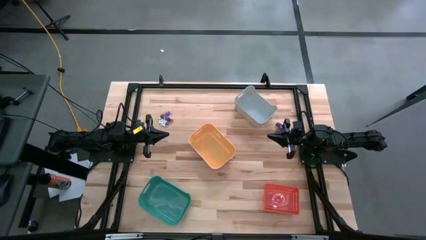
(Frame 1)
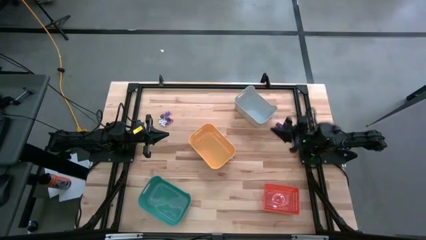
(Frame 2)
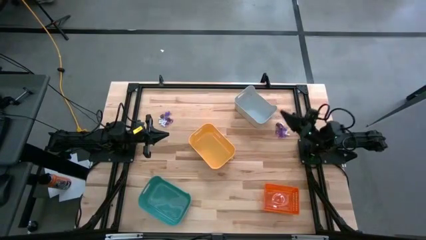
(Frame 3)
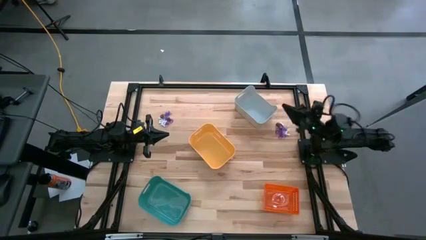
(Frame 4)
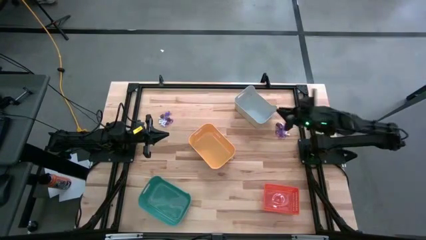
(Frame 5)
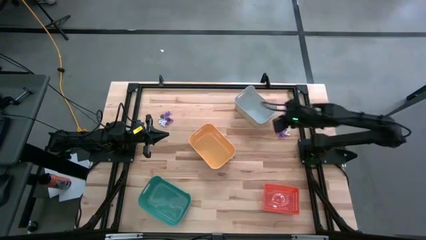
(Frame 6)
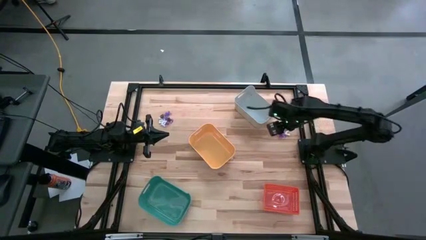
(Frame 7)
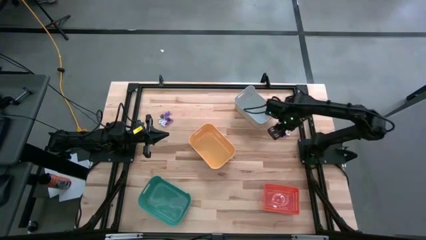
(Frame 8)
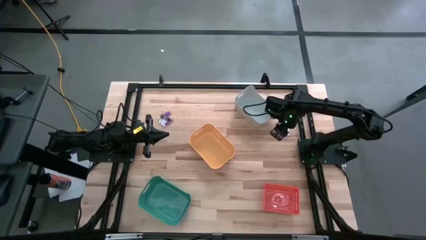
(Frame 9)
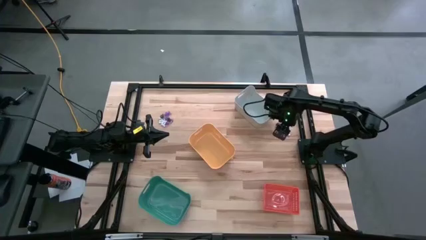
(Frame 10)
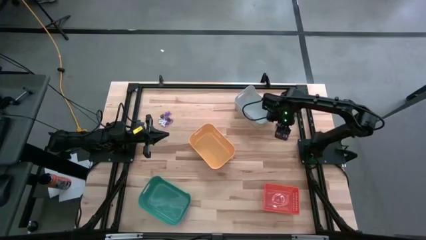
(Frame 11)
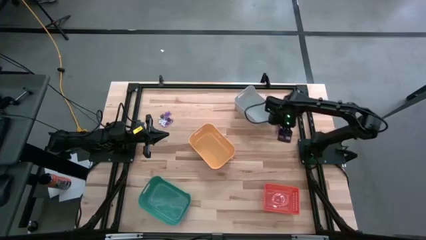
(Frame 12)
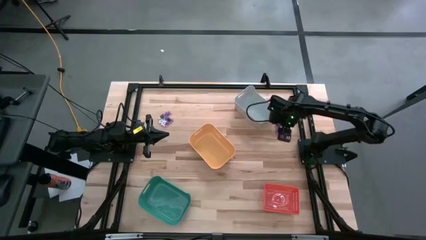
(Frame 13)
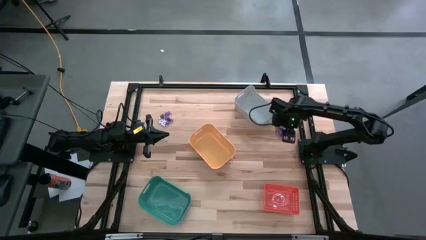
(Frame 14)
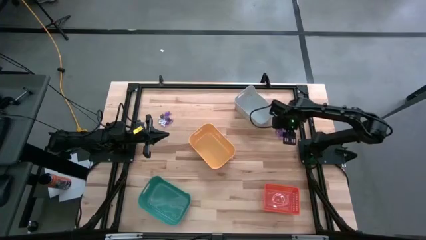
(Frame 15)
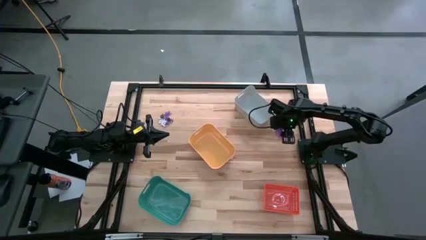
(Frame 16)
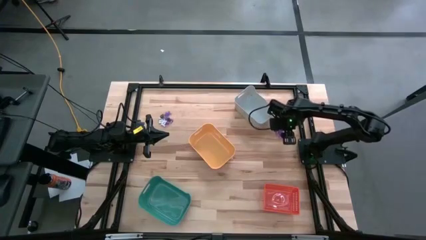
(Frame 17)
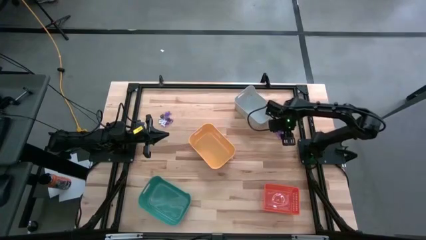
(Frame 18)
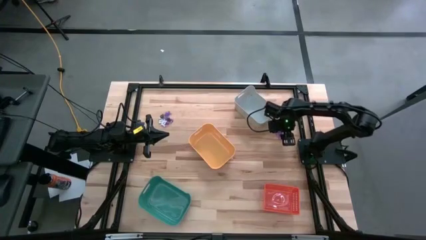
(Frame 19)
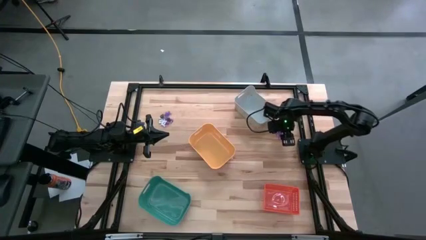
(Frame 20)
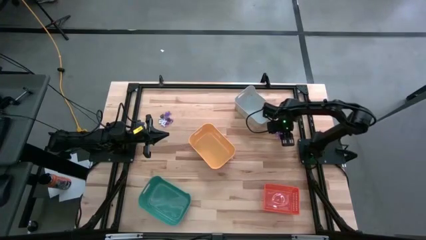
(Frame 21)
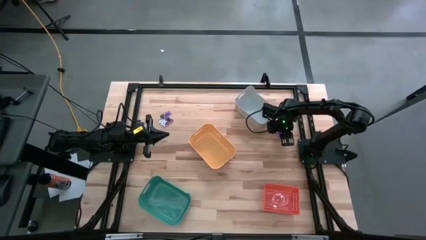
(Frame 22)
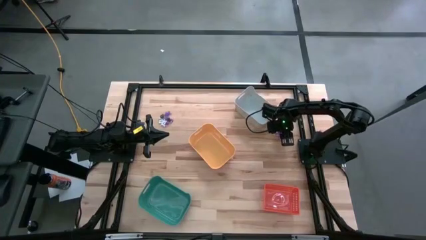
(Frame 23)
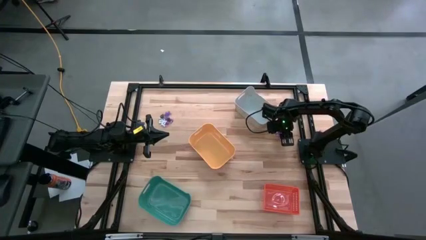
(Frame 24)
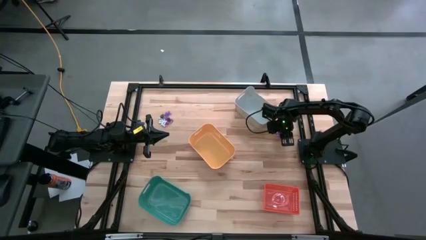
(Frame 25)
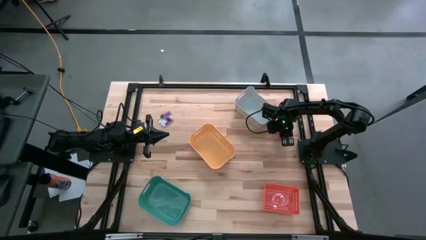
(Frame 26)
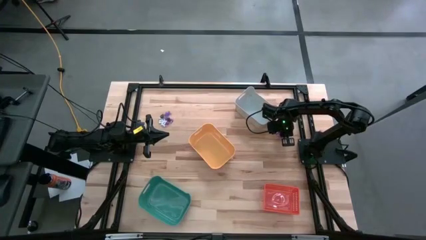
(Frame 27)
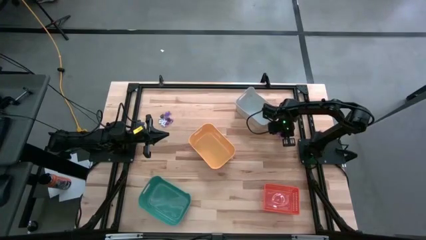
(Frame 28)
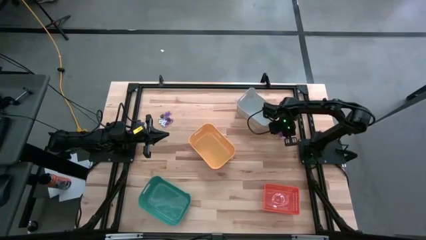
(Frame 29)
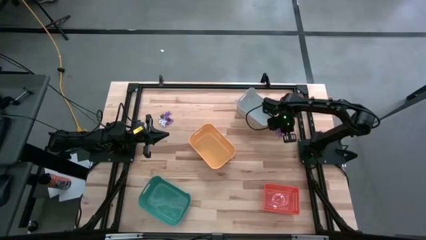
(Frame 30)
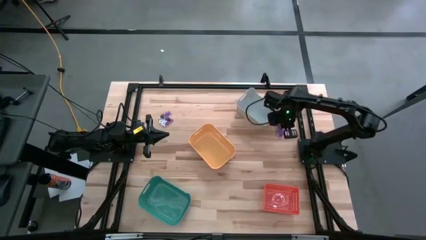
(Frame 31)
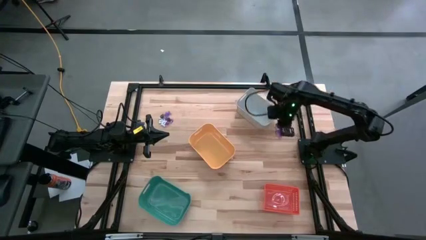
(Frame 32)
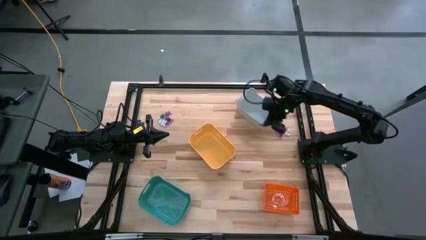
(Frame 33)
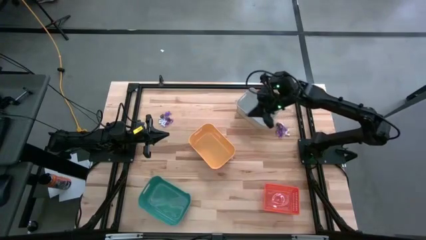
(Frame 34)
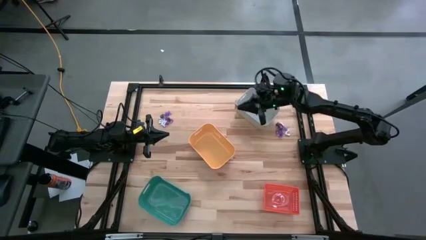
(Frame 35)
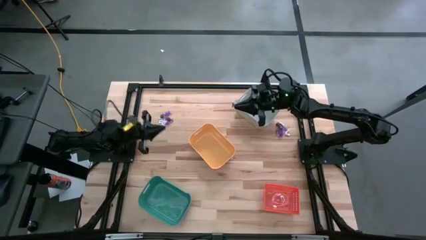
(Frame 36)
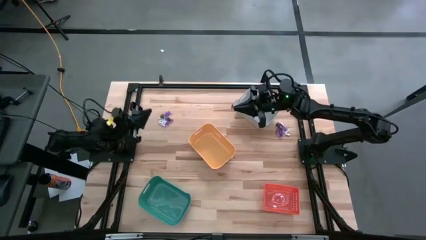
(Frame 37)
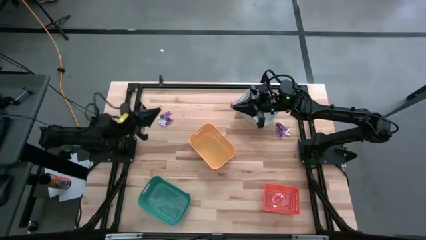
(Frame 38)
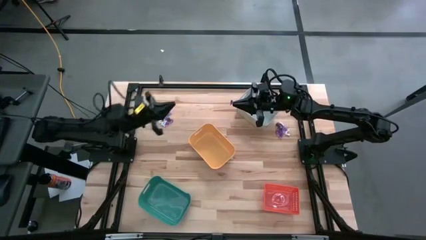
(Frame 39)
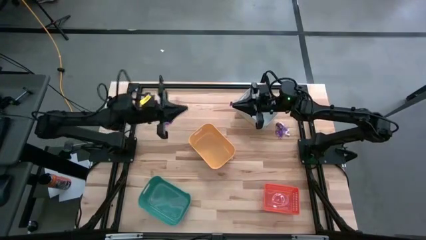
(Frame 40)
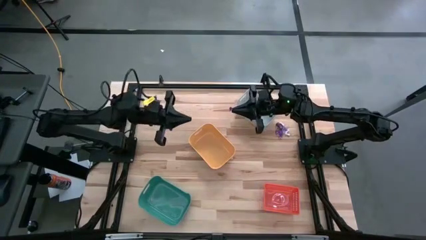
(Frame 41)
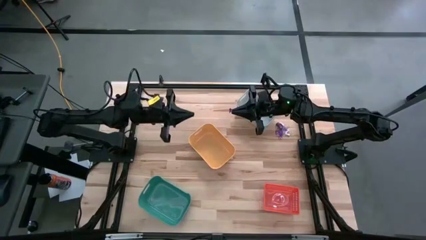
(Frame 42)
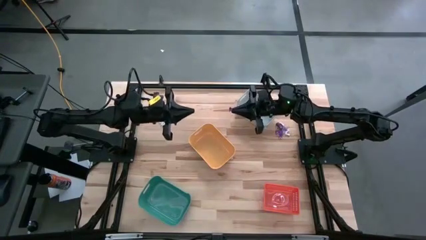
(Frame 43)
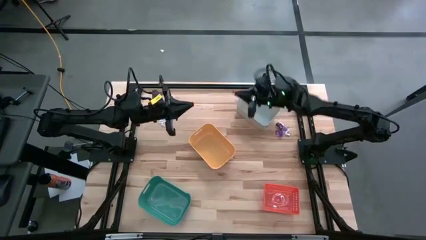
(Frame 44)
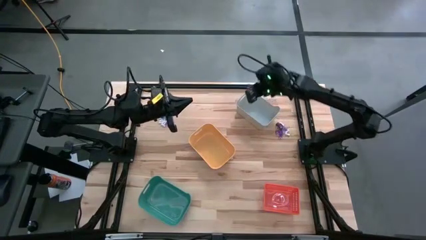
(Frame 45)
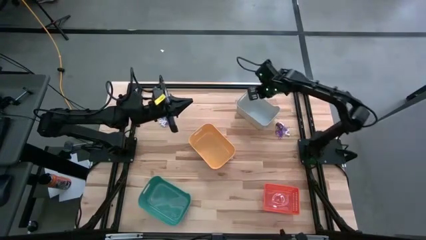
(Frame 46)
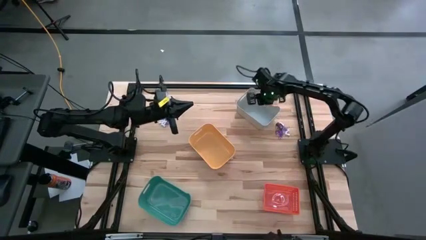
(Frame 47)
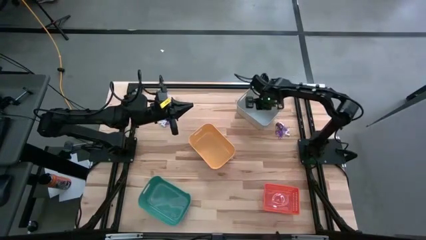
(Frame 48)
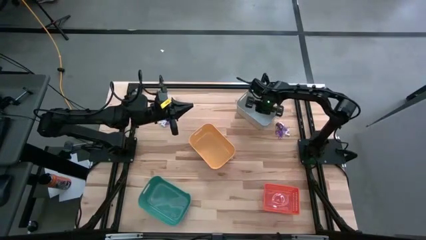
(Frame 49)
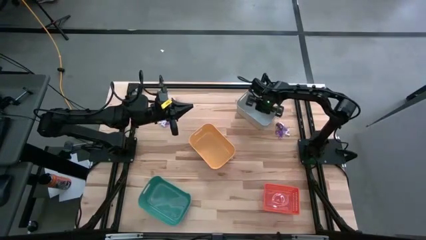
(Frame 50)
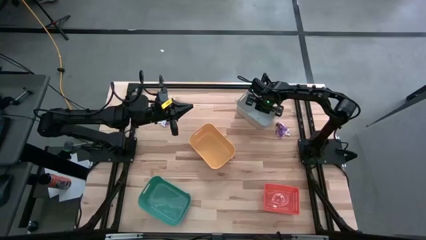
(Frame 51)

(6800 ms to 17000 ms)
Task: Sort Halloween decoration
Put the purple witch hat toy into the white bin

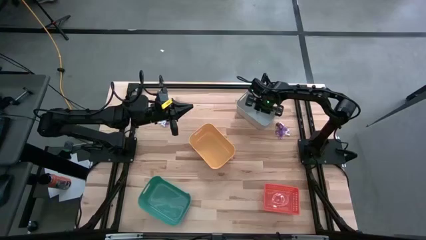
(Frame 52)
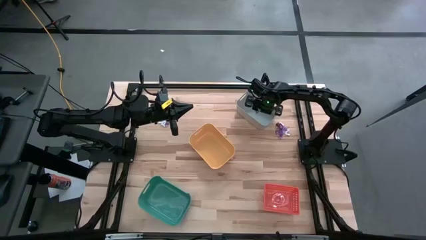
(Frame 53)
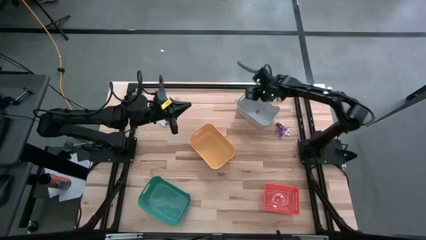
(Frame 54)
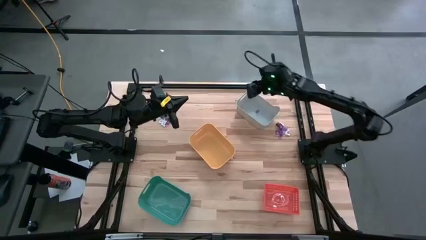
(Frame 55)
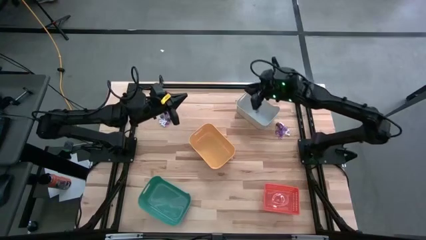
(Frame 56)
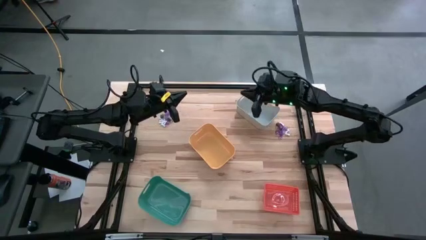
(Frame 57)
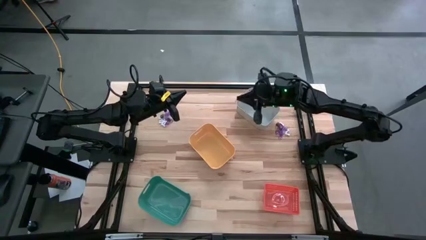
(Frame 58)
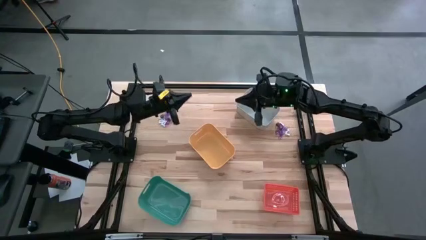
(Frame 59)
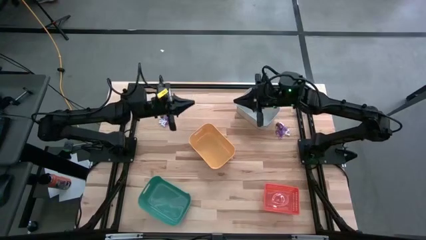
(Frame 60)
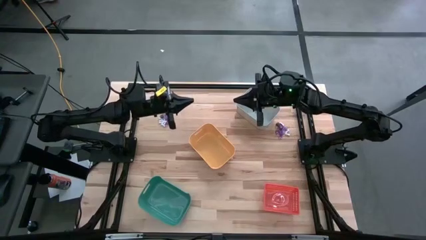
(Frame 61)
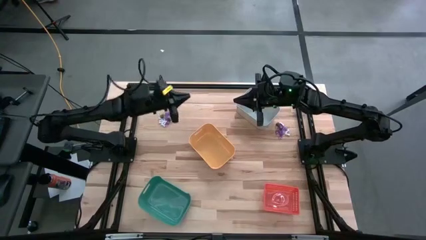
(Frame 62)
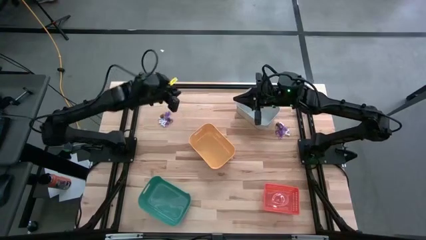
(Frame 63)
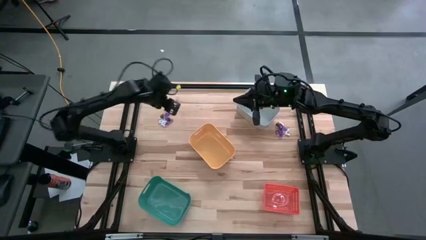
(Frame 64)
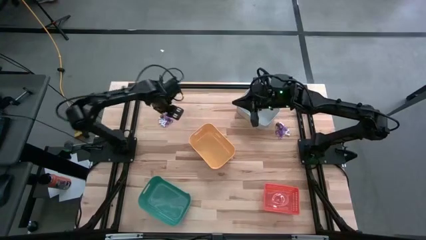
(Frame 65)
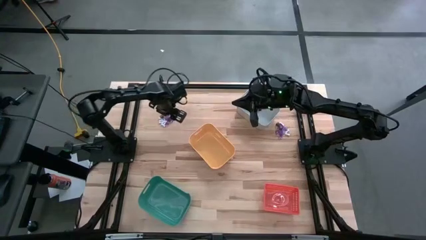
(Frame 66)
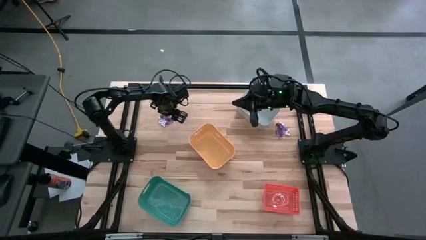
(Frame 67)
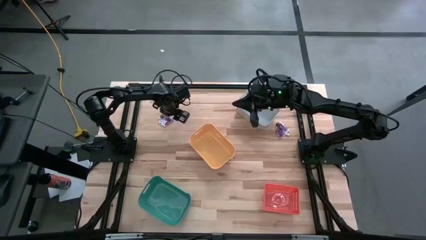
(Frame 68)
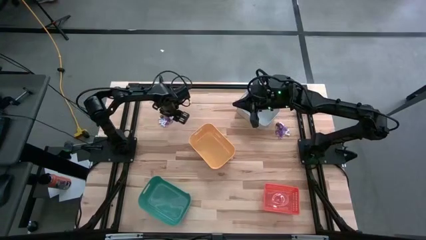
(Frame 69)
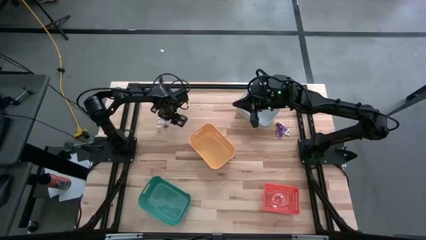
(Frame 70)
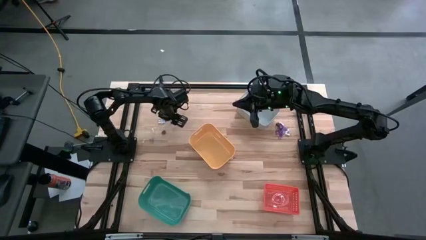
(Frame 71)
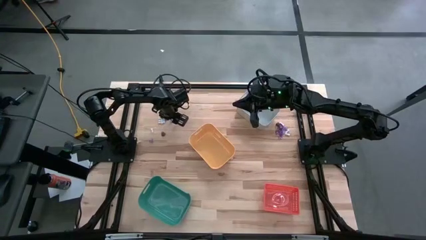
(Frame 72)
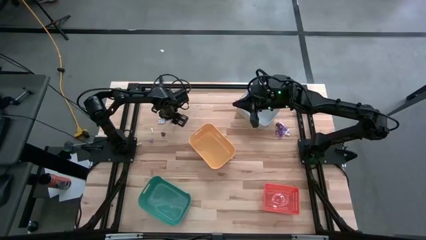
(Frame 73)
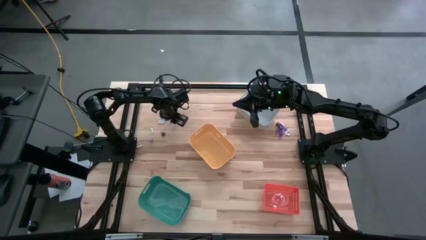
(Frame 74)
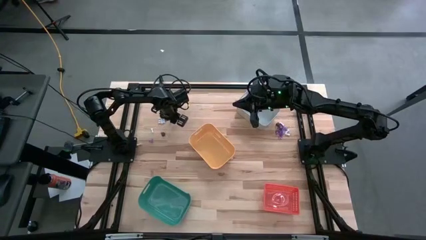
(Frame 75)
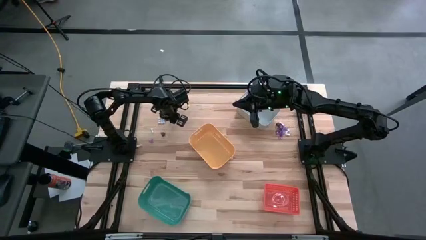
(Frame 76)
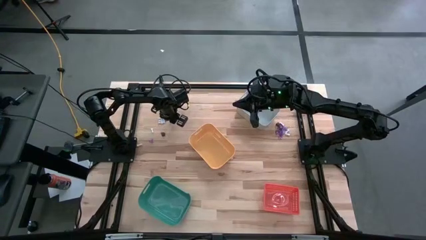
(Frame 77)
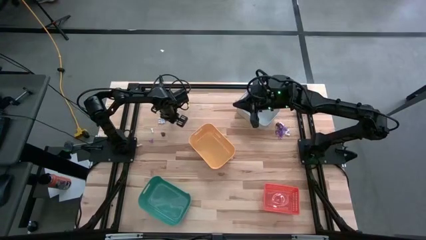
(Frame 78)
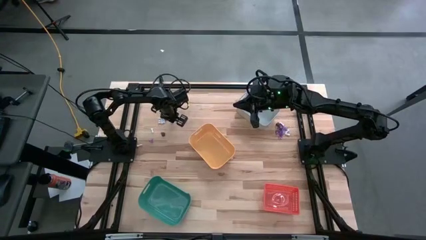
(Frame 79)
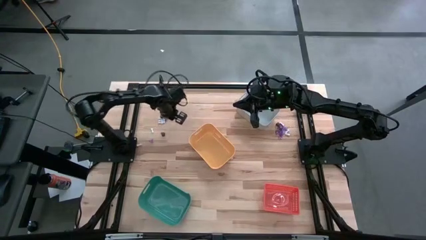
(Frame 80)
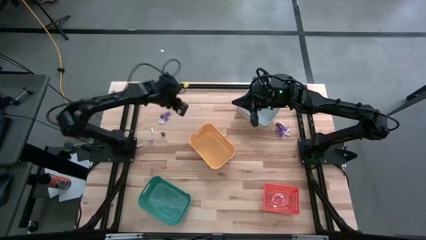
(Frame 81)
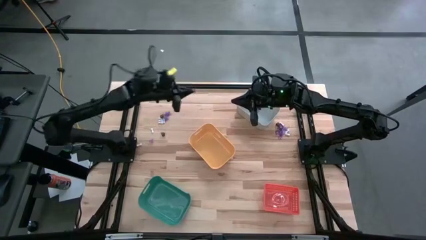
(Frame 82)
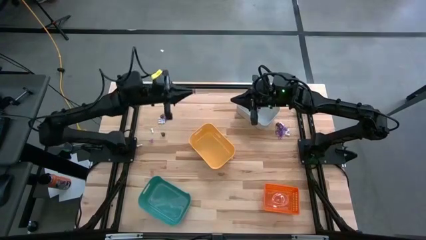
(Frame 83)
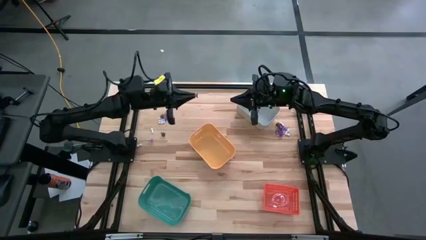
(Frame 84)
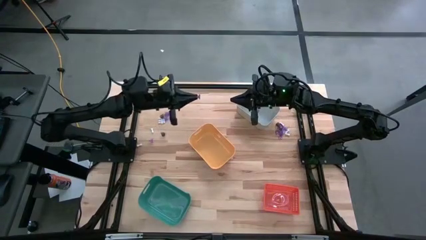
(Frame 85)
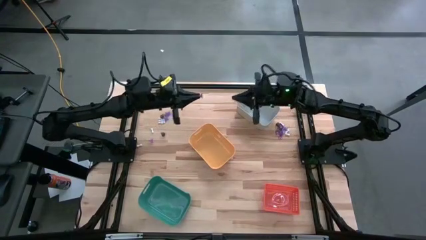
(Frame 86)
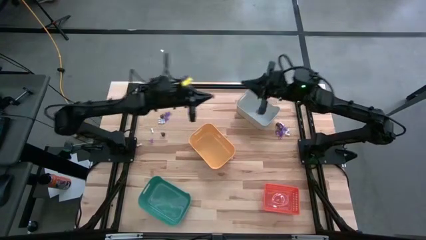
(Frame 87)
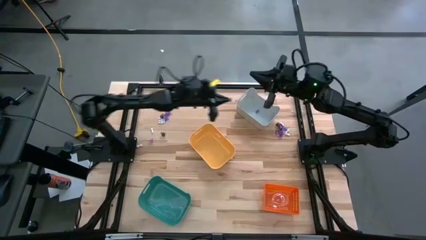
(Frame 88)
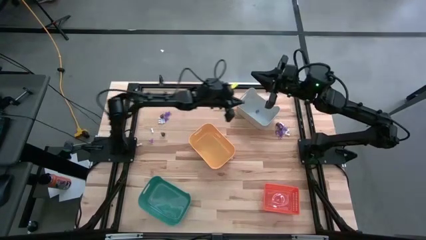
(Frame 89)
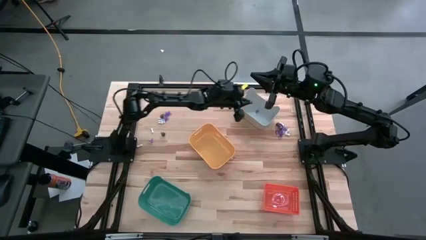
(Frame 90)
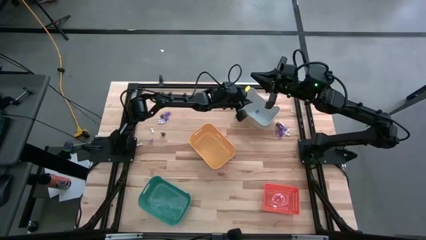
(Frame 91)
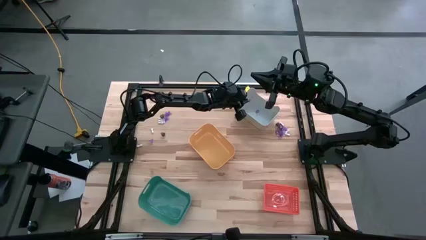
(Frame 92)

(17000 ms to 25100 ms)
Put the purple witch hat toy into the white bin
